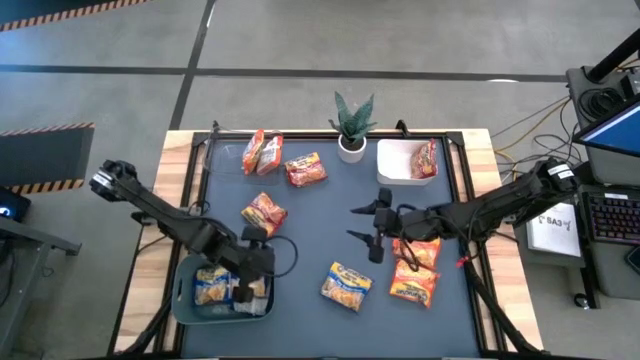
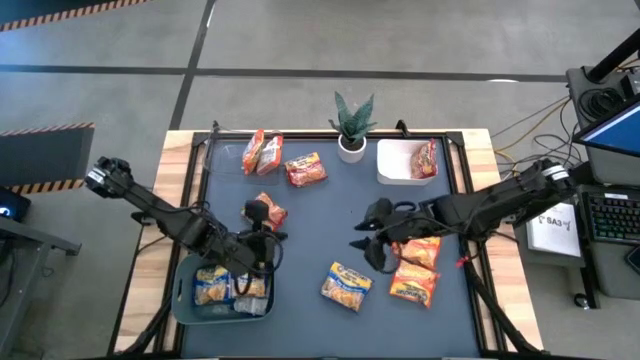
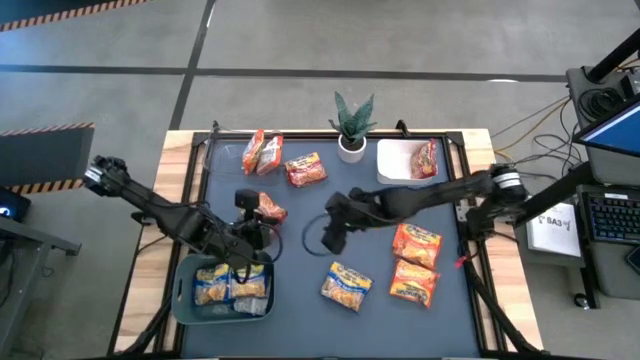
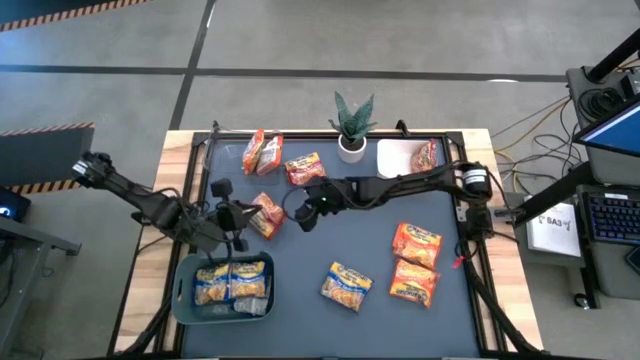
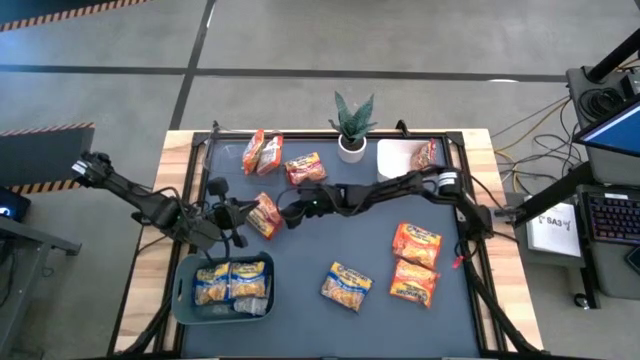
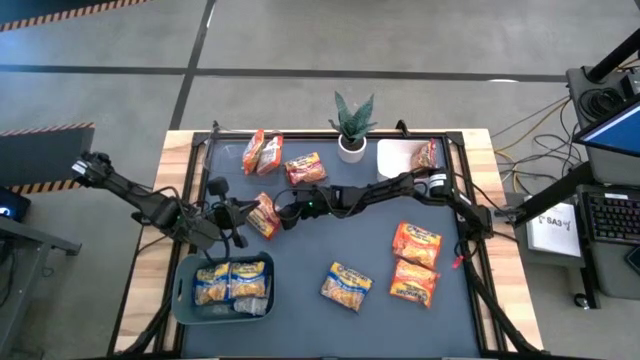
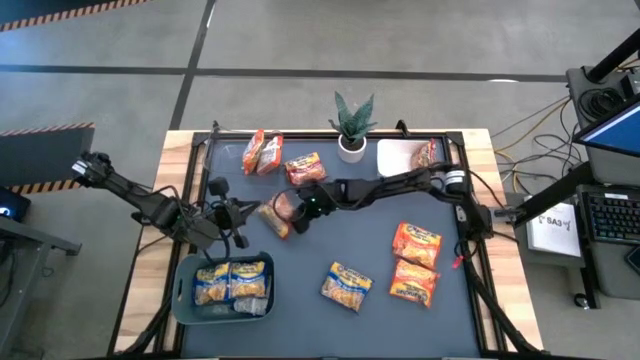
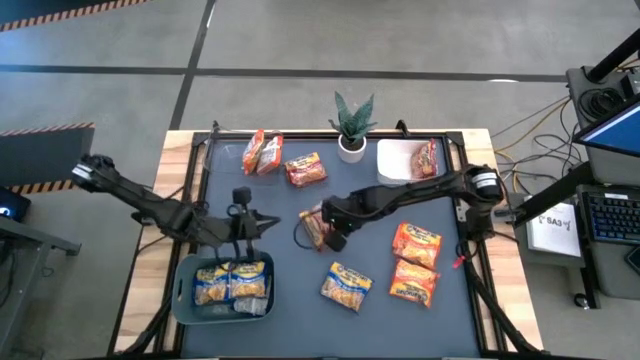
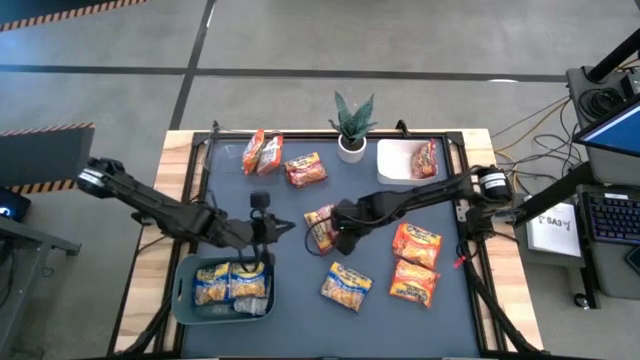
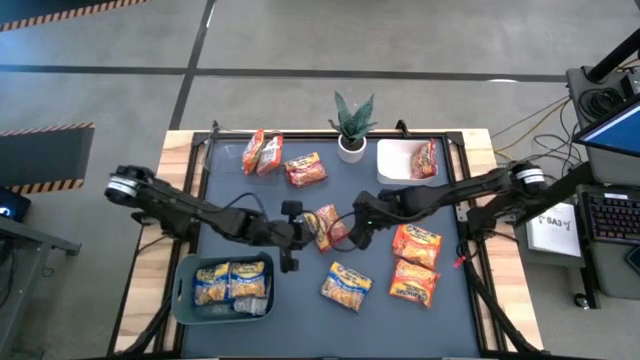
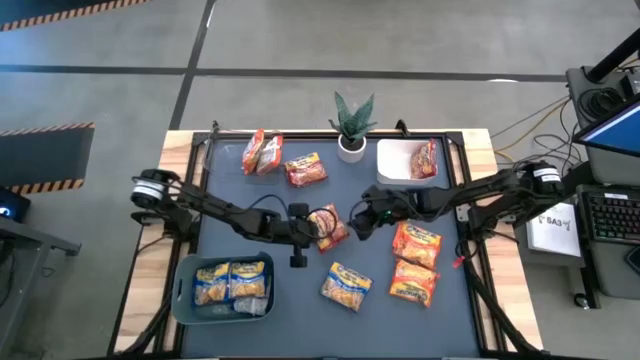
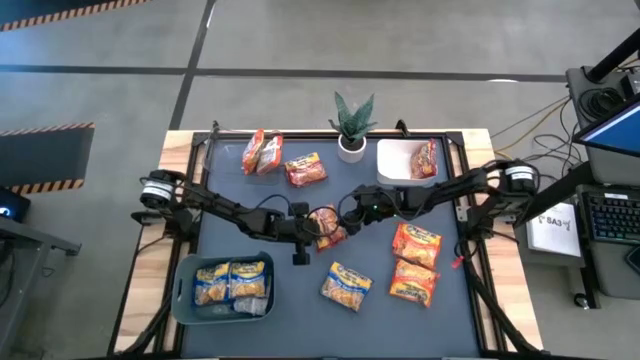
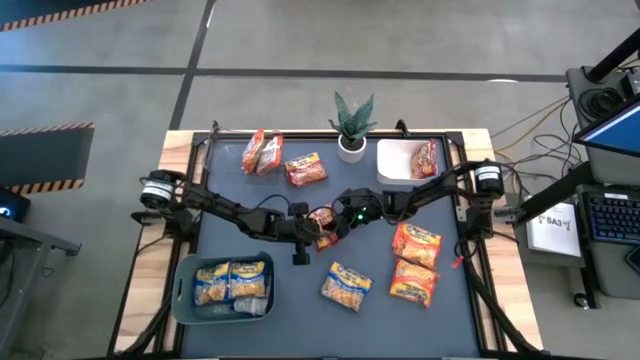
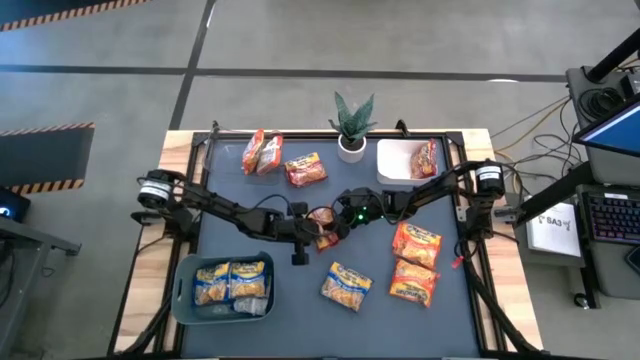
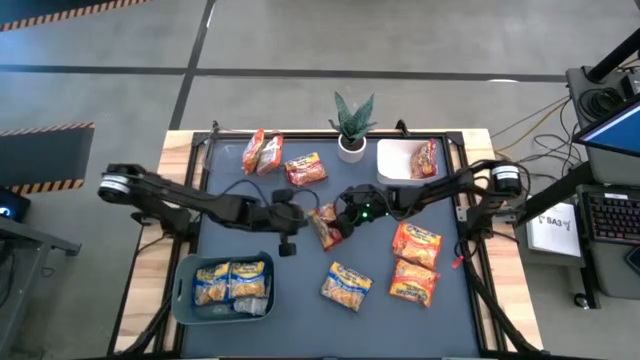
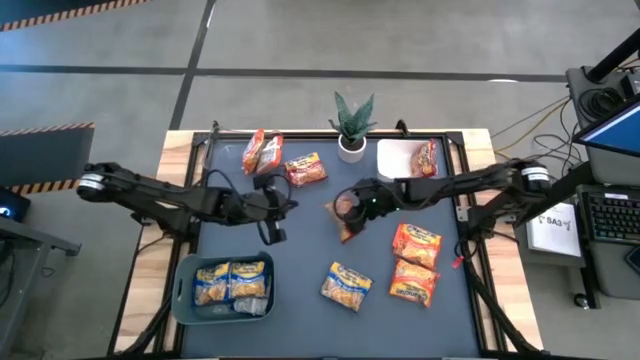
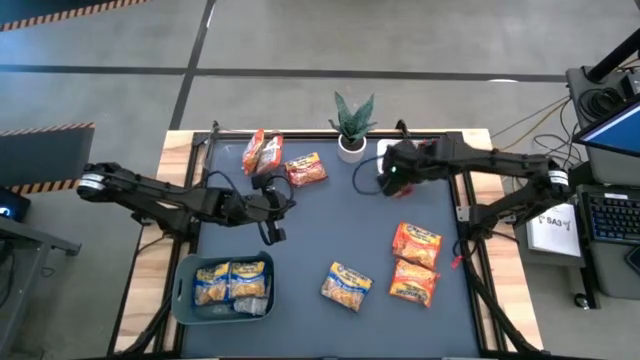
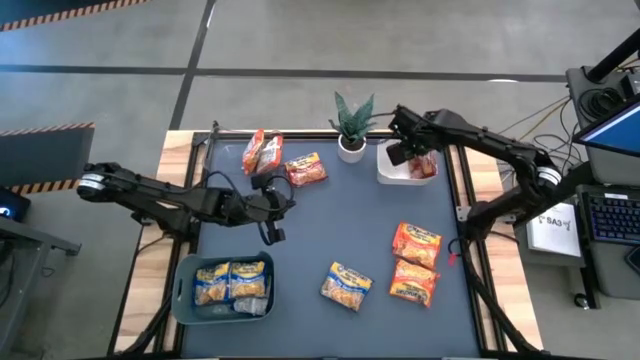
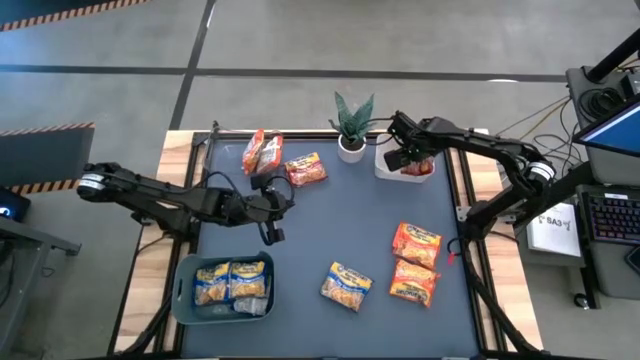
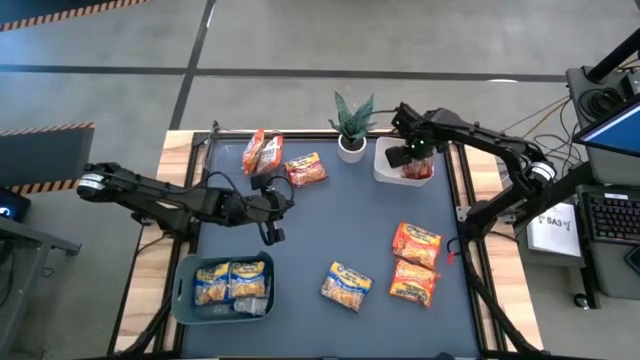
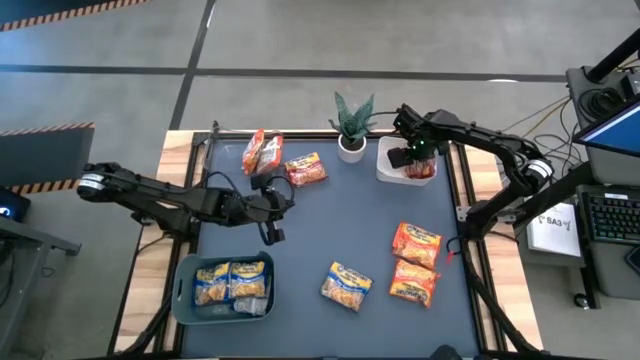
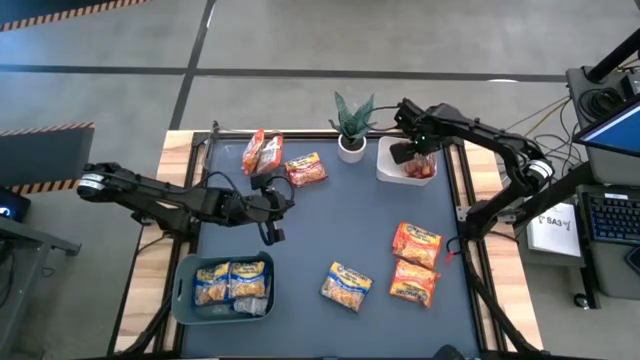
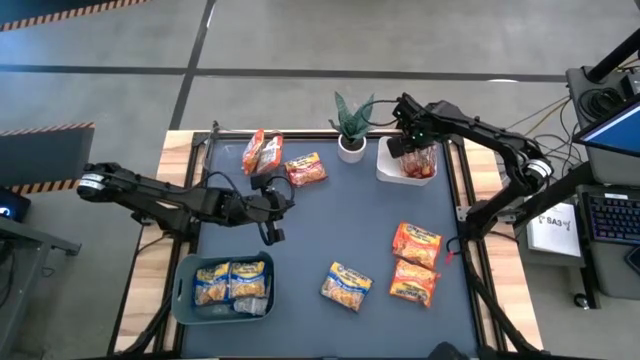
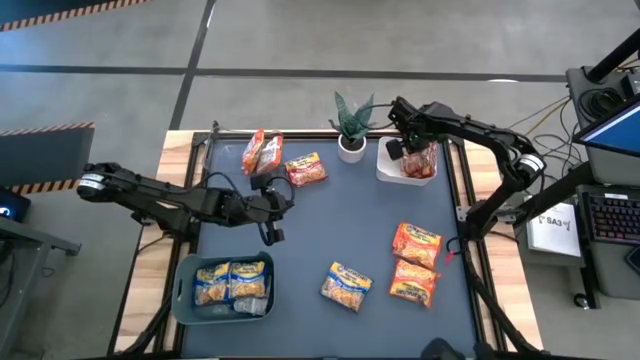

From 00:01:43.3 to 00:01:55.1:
Task: Sort Maruchan noodles
Put the red noodle pack into the white bin

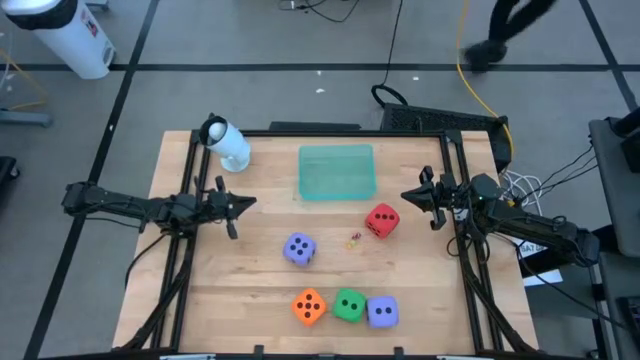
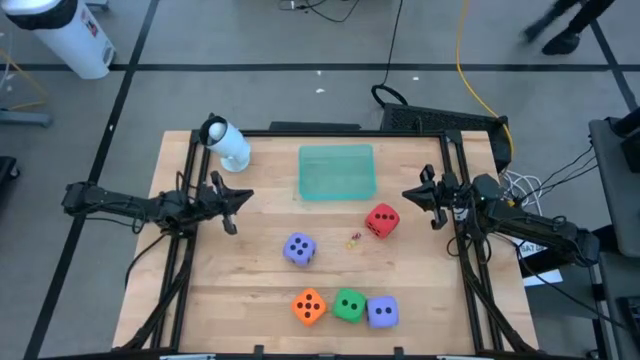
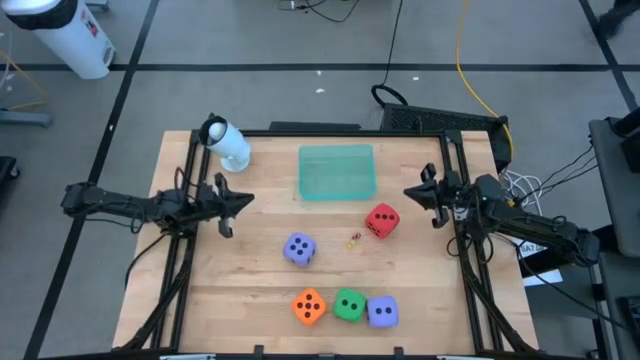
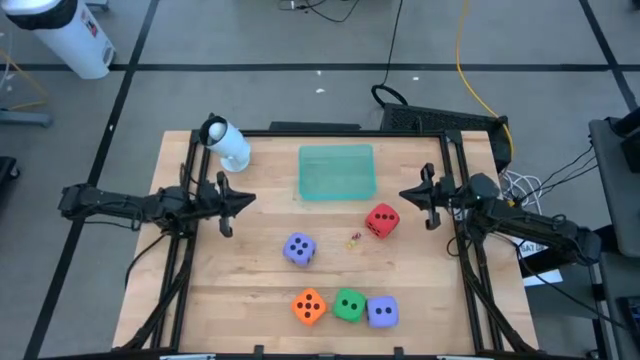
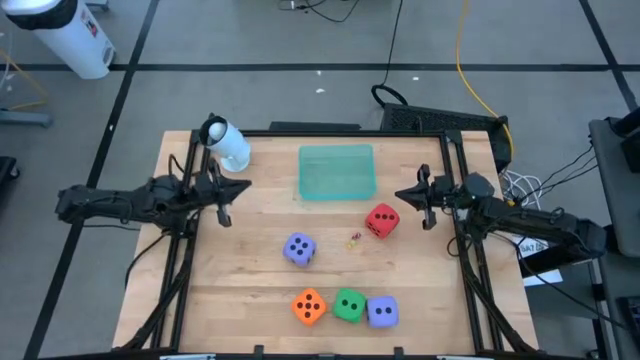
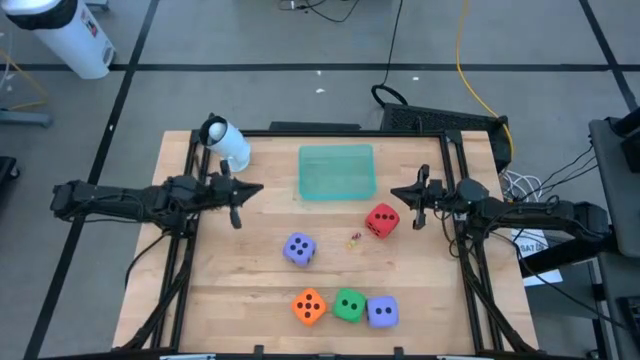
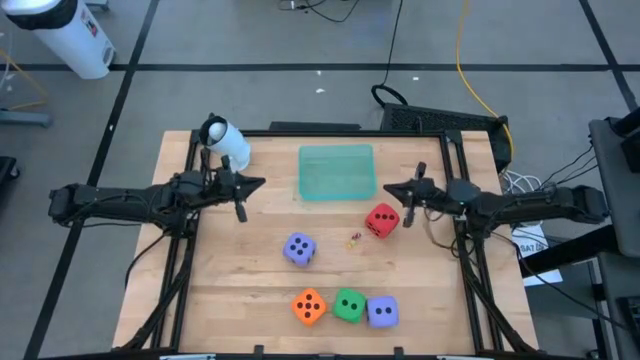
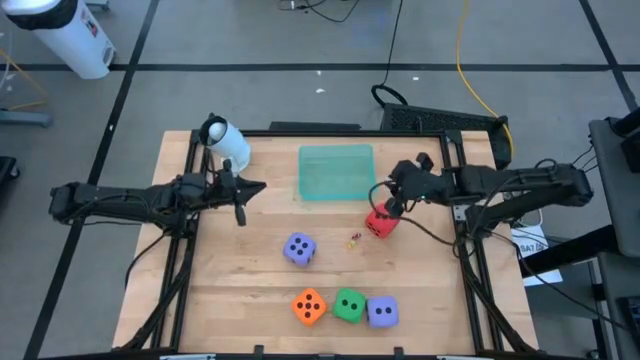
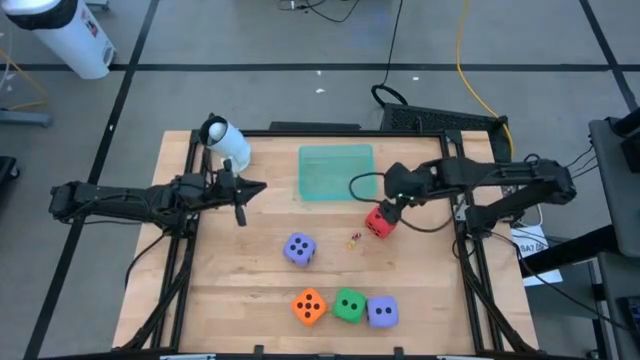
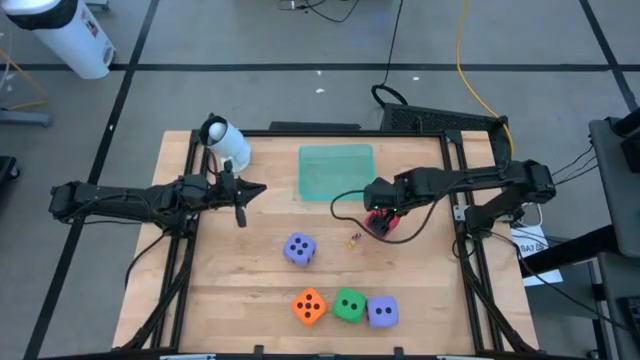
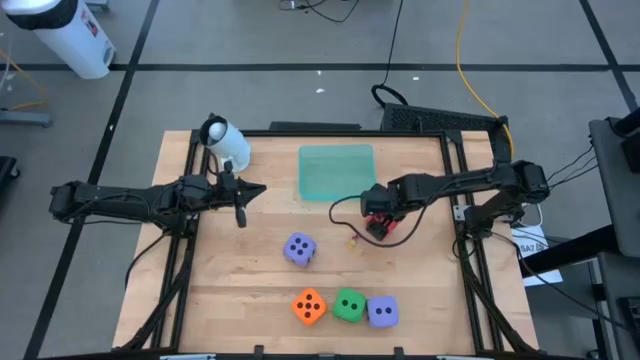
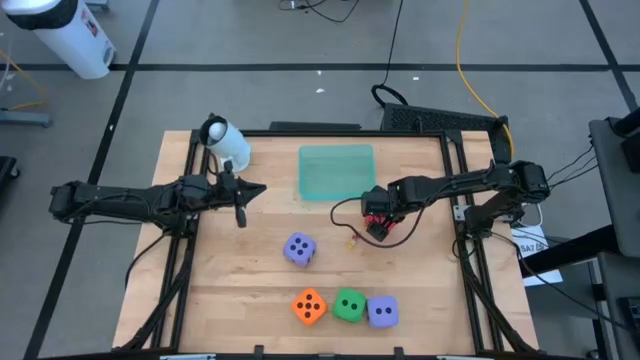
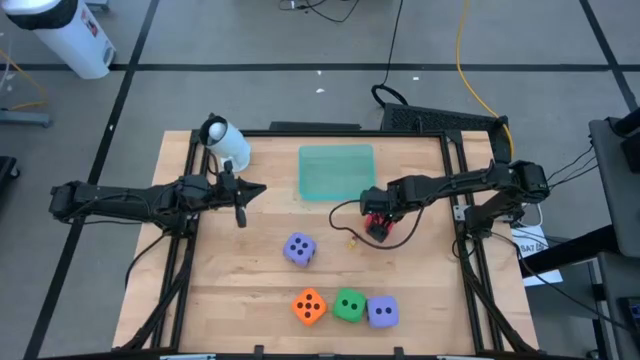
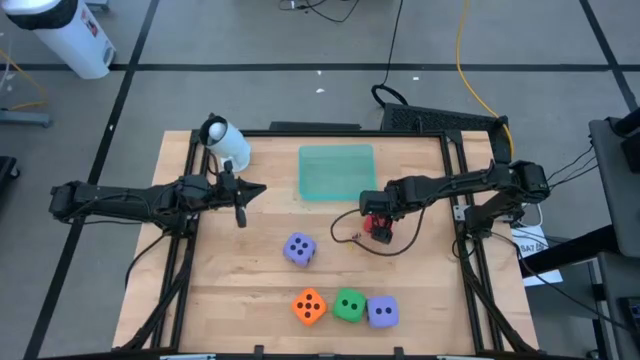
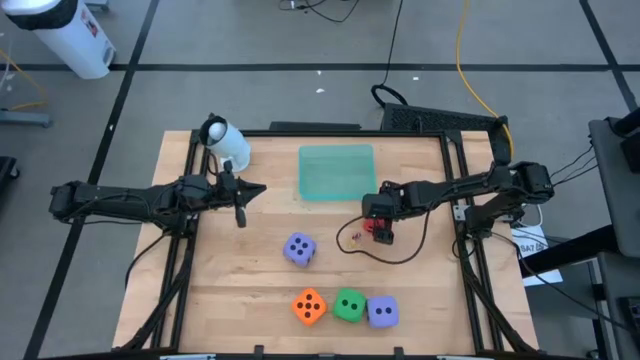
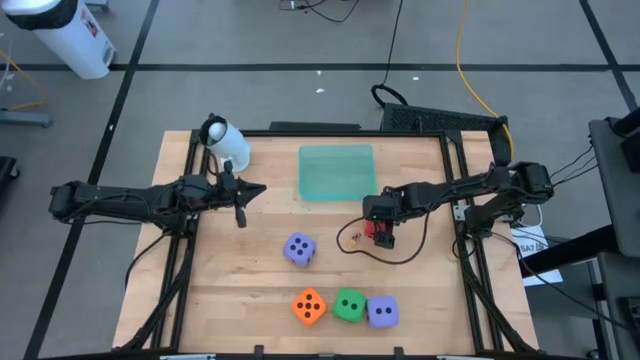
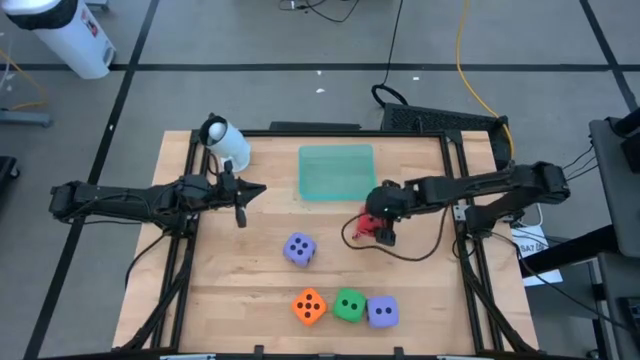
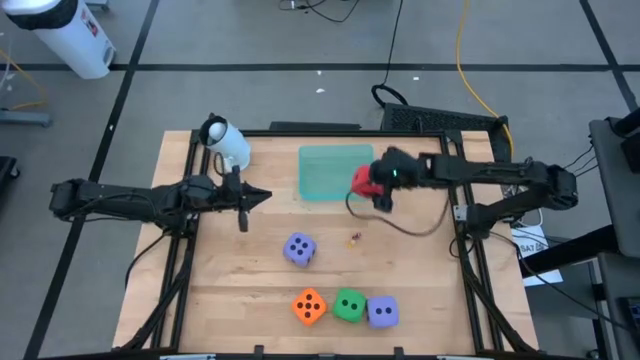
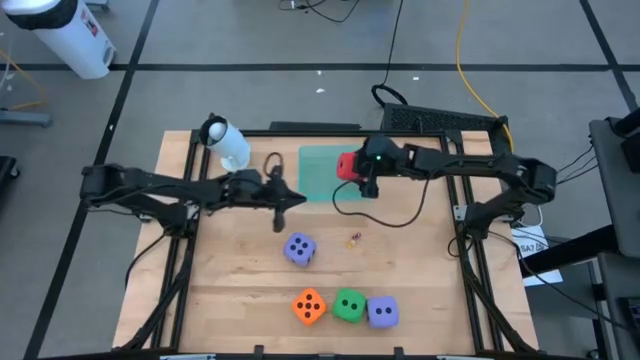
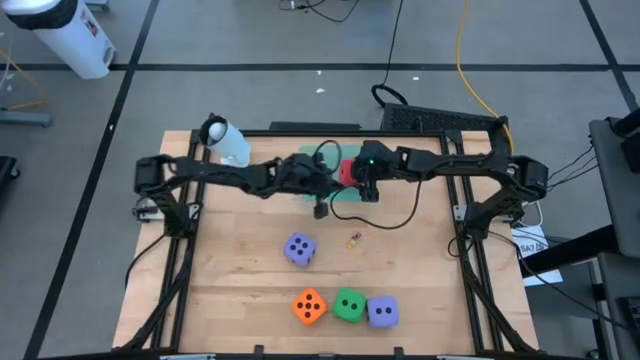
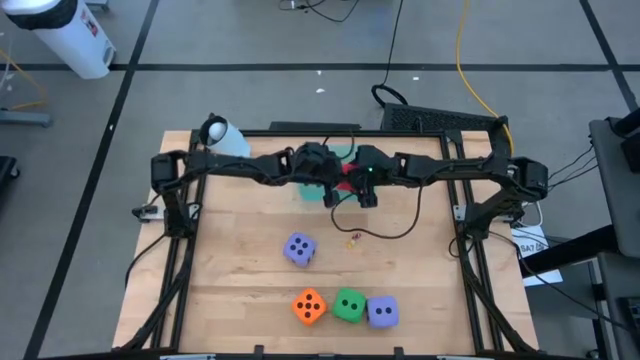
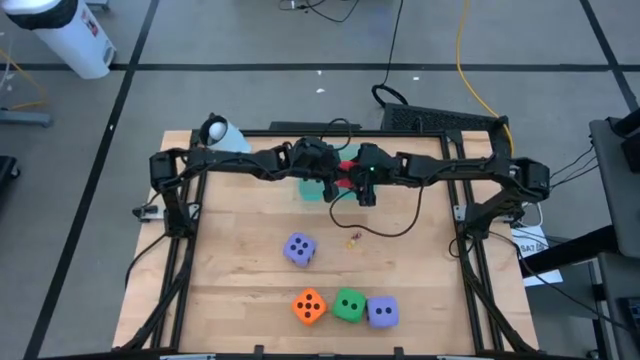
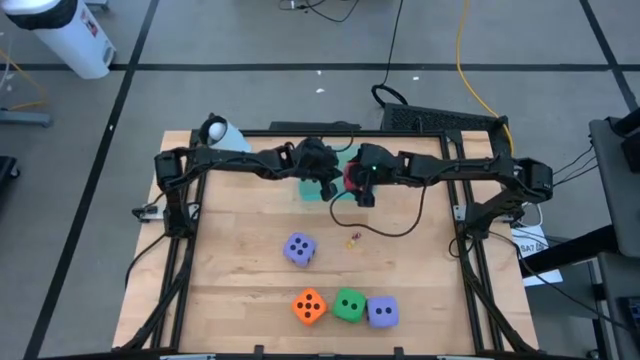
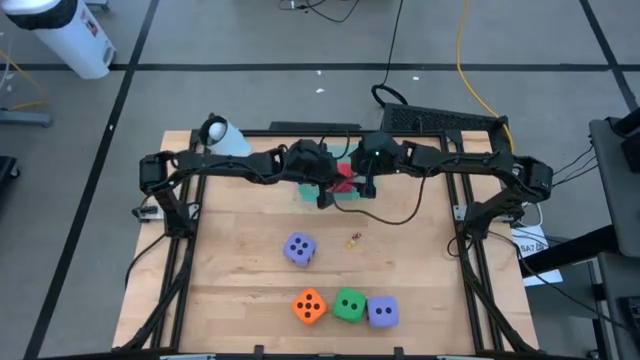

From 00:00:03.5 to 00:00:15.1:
Task: Pick & Place Dice
Put the large dark orange die into the bin
